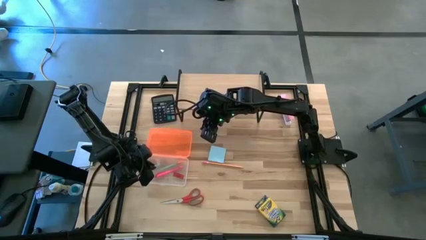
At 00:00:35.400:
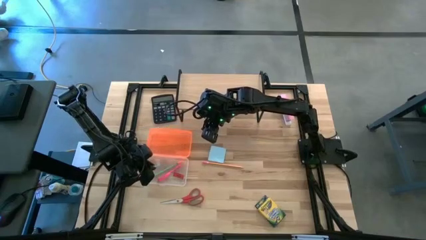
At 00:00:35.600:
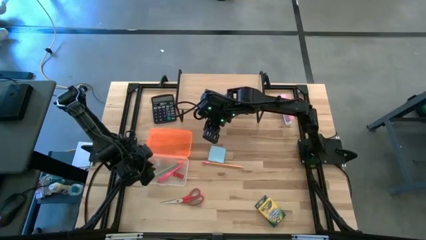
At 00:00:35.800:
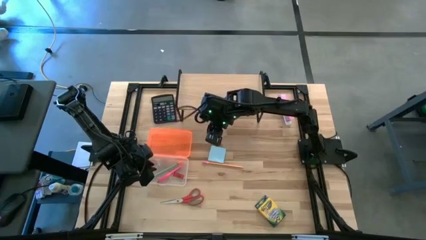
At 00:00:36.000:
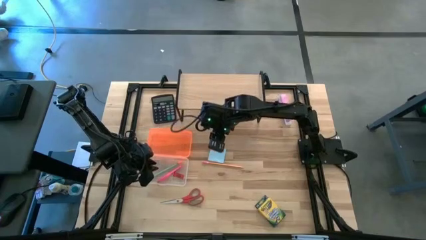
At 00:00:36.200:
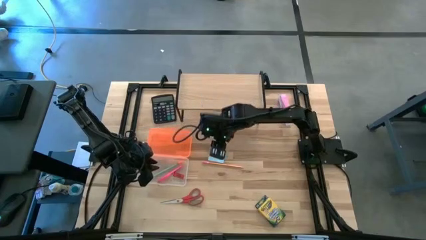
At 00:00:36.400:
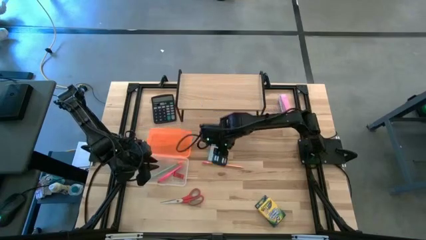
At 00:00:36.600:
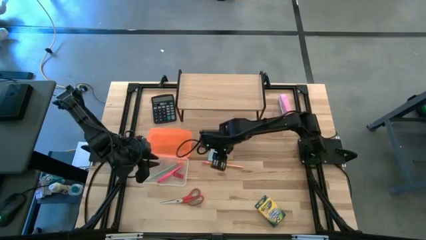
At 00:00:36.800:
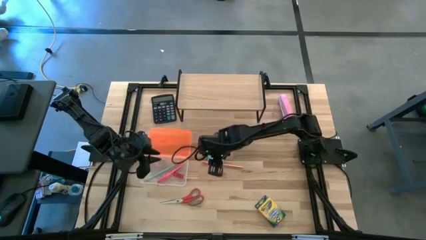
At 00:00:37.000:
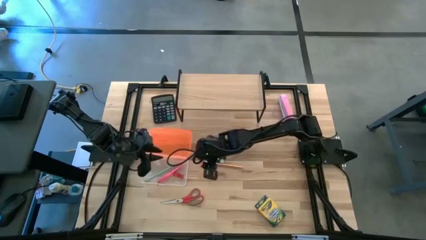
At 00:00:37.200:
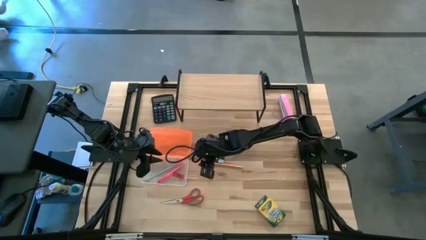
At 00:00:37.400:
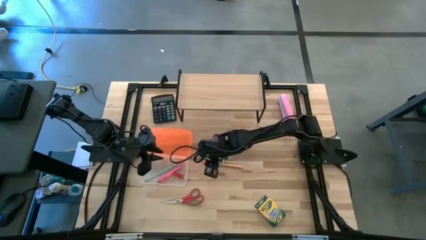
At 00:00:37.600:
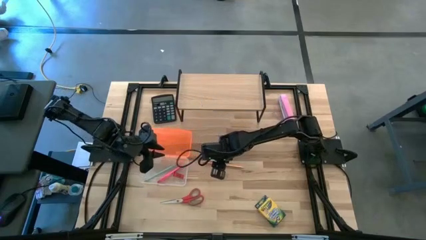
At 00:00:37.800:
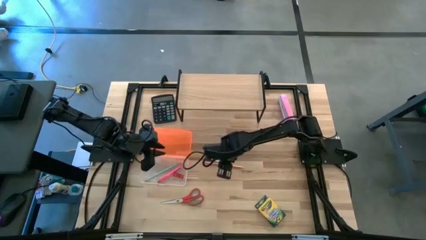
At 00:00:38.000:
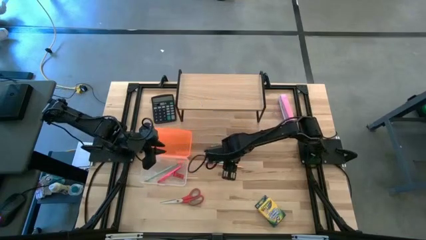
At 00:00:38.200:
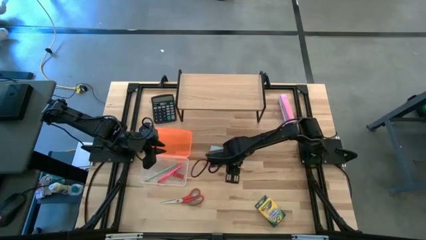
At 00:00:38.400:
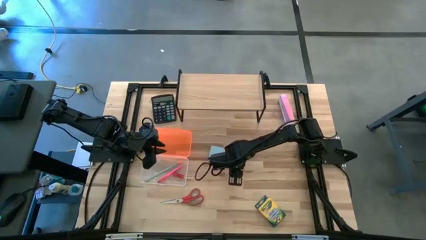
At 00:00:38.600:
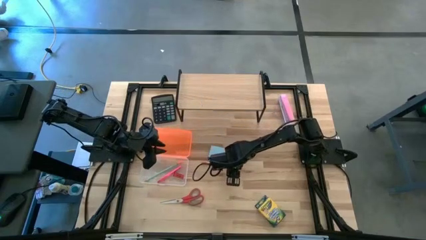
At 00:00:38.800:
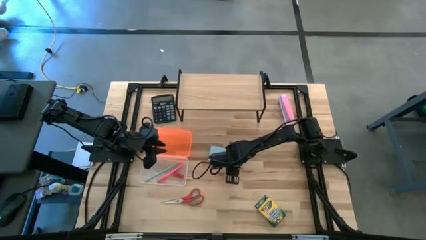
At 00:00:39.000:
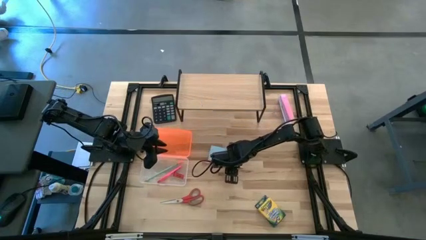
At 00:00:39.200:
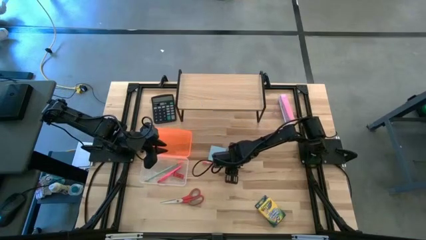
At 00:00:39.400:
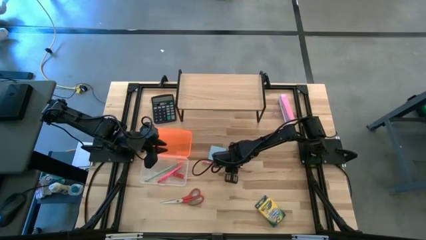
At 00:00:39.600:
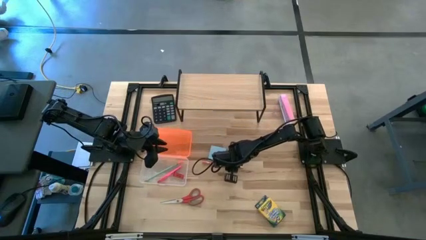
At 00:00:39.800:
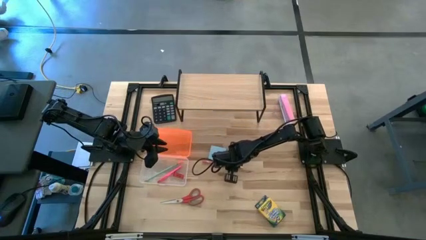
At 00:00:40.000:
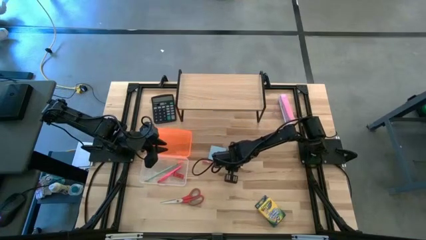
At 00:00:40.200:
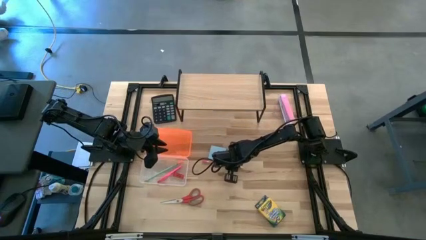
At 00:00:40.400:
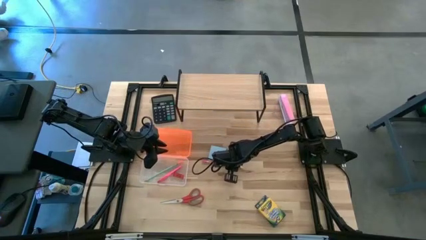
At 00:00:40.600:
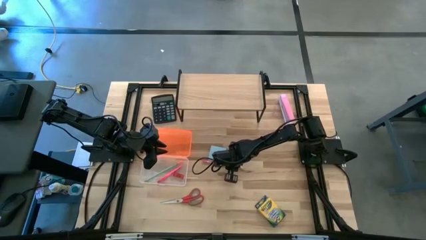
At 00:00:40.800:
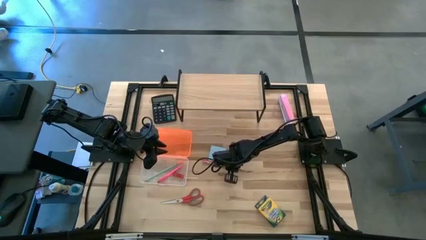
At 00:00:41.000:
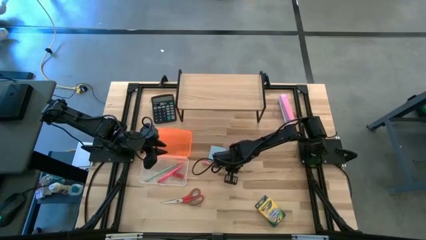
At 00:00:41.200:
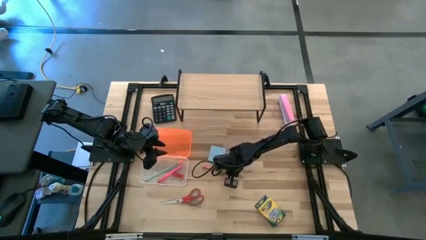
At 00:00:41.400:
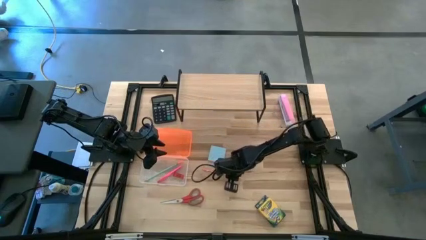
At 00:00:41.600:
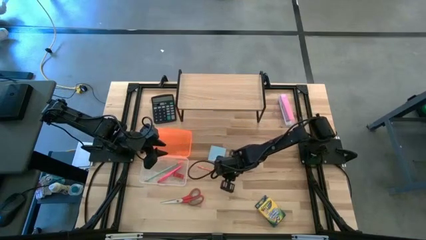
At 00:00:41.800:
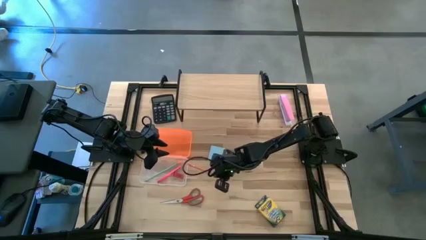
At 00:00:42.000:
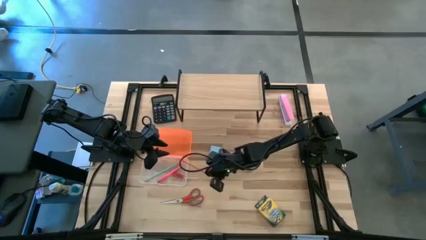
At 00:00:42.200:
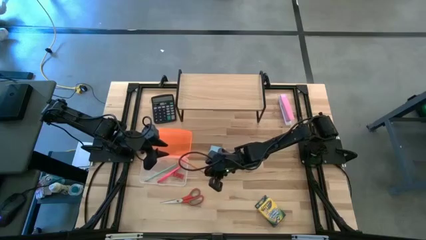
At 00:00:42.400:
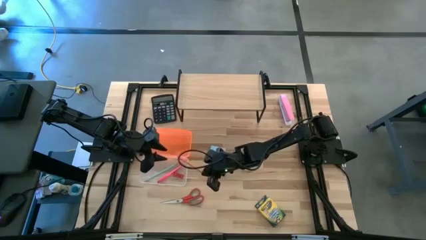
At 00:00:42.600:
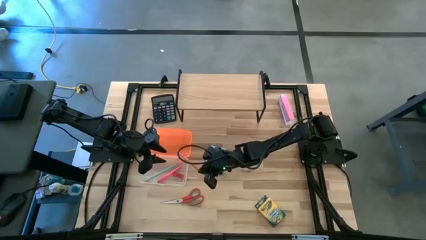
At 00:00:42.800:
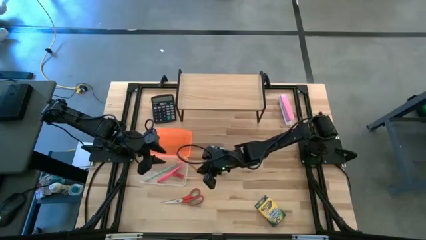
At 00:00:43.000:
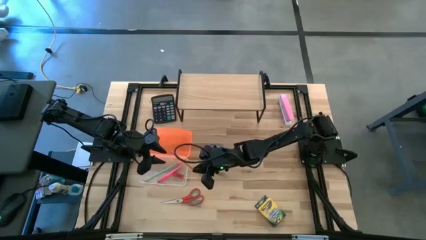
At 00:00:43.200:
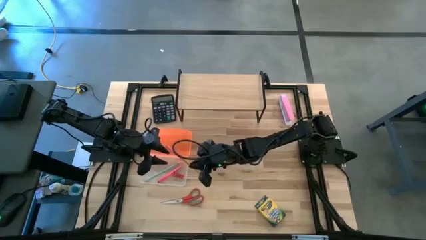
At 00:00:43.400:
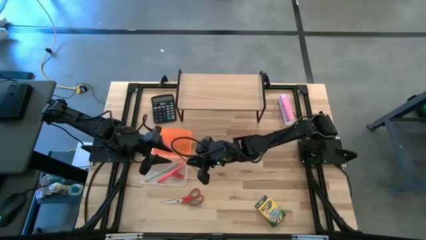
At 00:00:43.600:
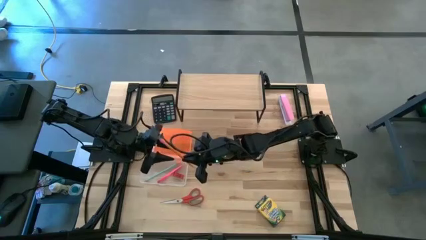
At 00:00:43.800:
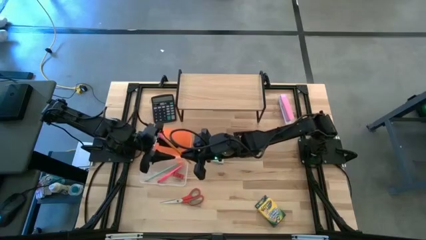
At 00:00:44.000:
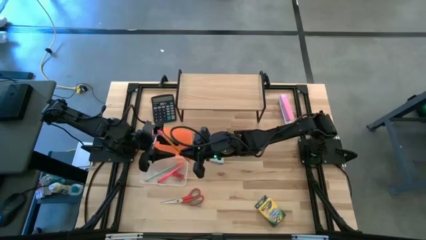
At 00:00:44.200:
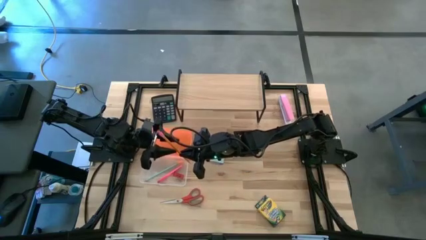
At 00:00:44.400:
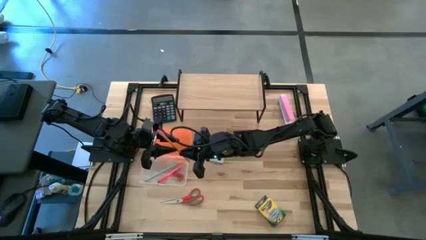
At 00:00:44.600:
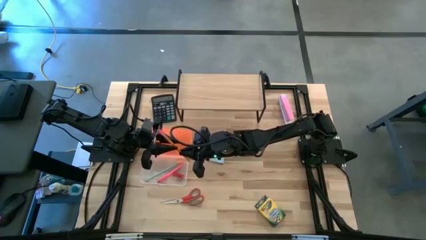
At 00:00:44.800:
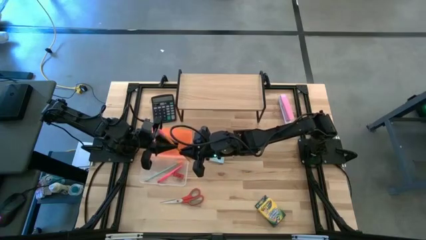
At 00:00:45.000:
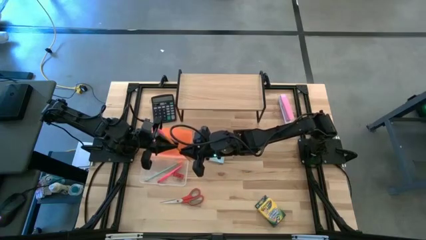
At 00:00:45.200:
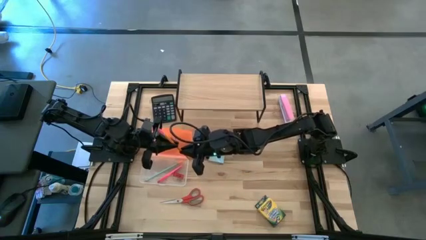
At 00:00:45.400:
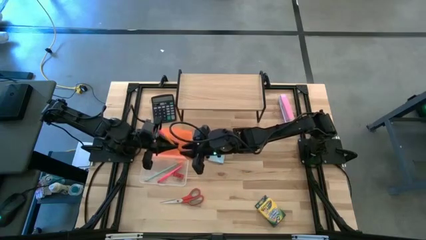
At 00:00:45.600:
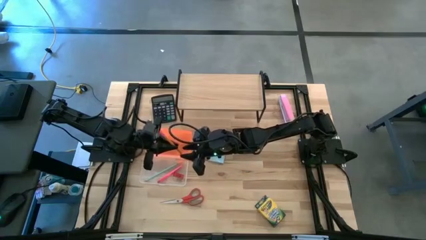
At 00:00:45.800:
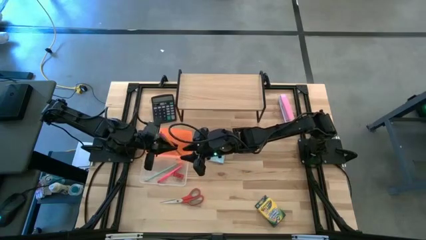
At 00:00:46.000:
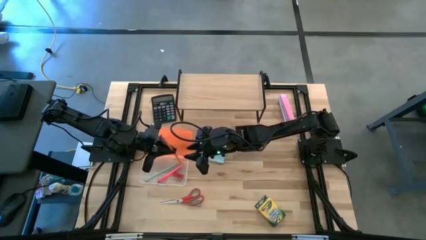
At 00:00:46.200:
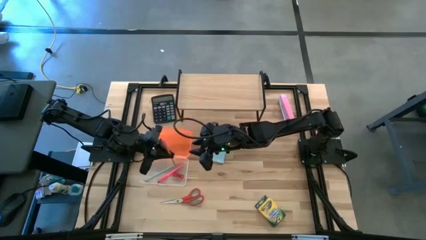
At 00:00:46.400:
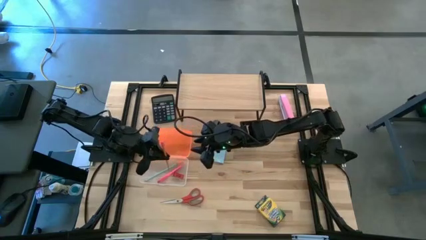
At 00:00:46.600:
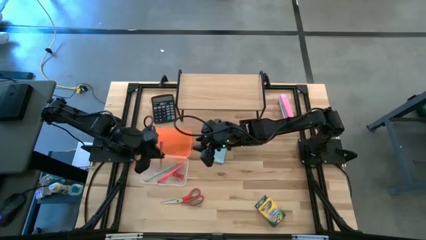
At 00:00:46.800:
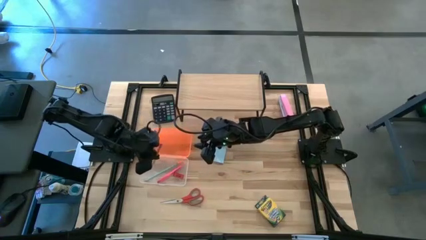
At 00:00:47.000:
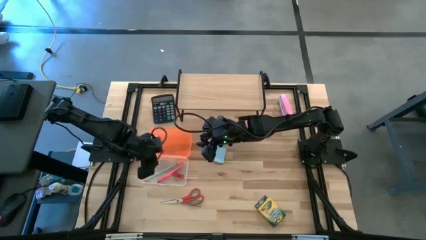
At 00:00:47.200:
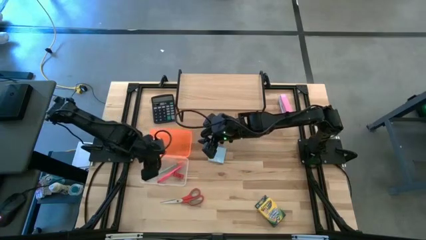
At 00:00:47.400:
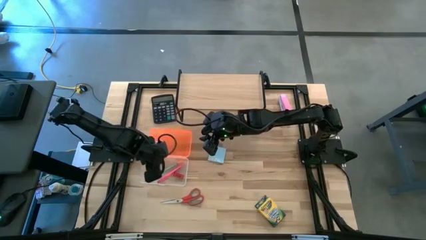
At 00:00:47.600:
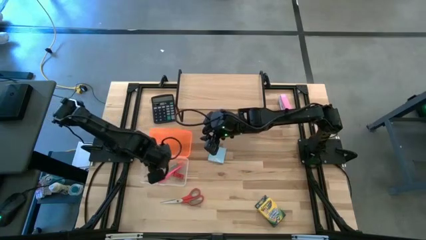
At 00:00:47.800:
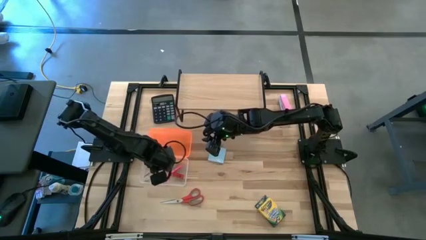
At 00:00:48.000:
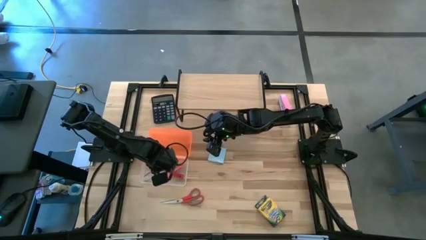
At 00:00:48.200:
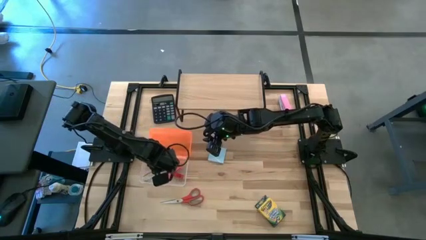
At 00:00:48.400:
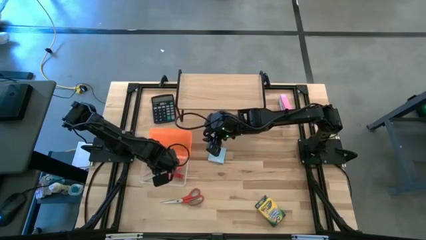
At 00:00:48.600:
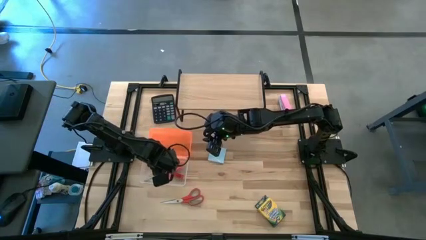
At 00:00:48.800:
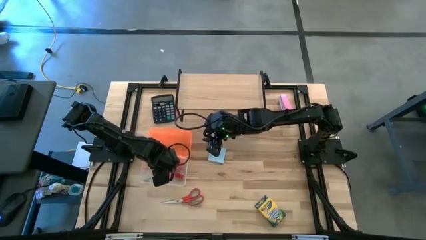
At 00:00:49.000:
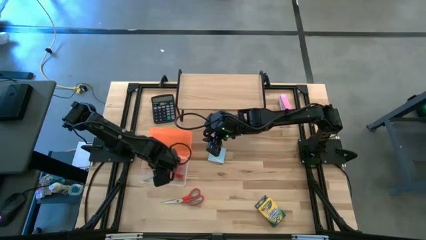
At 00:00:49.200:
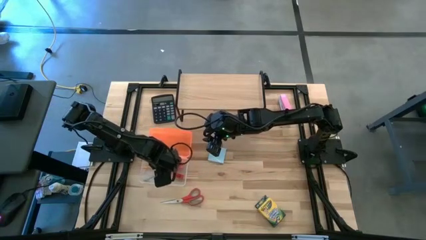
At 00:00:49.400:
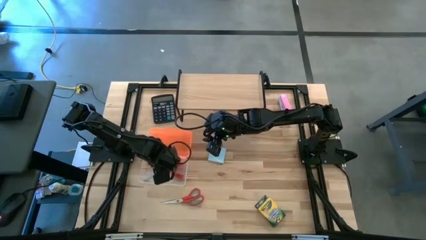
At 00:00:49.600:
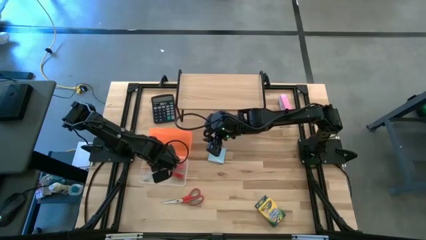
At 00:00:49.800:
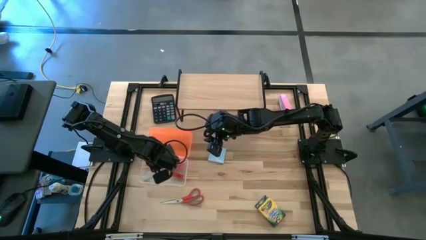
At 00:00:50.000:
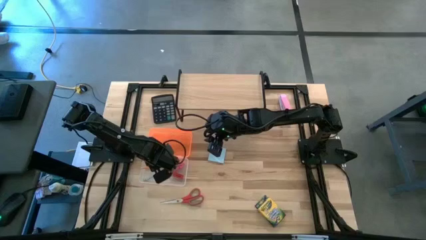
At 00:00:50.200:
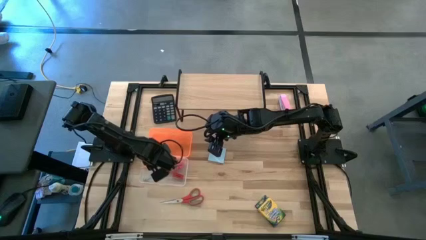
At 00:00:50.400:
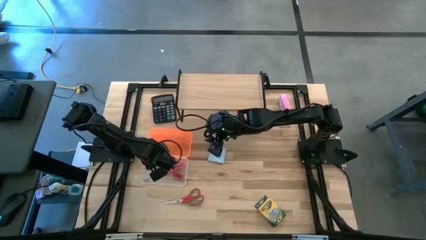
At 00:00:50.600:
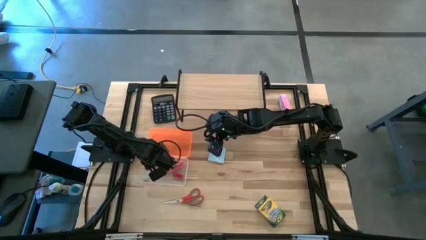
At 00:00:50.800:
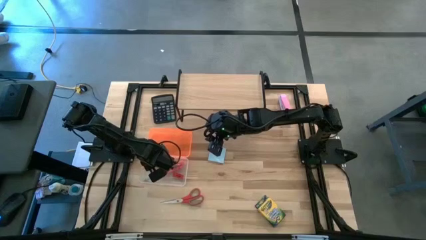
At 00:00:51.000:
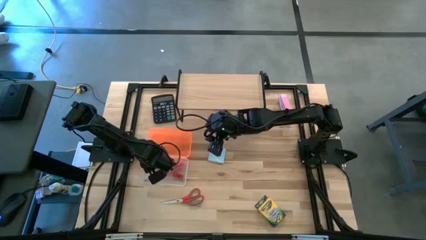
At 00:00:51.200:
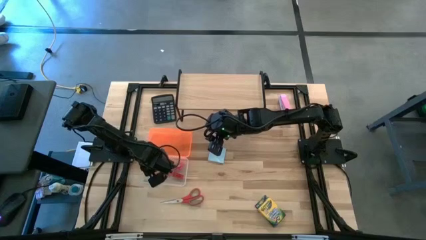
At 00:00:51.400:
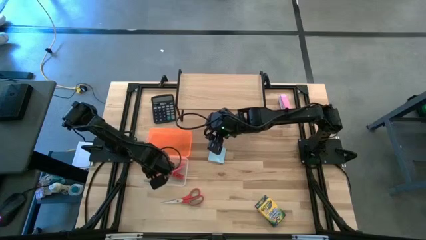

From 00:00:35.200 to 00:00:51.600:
Task: Pack school essentials
Put the orange pencil into the supply box
